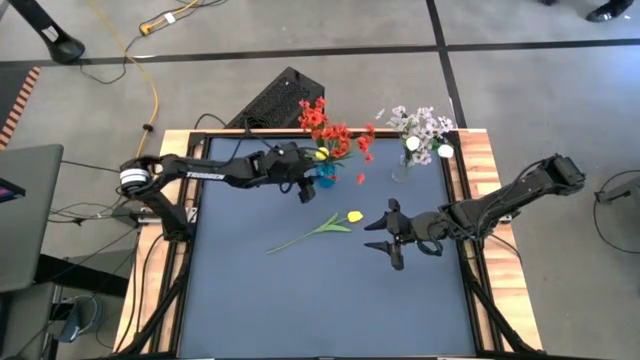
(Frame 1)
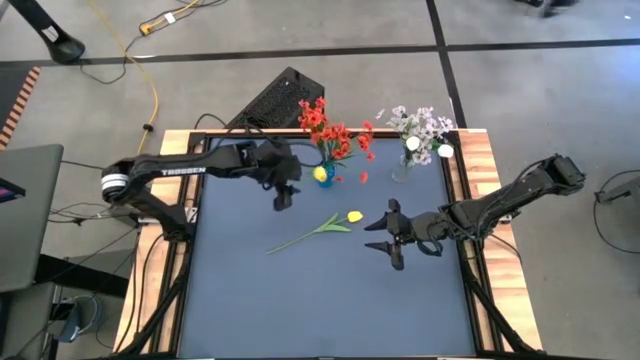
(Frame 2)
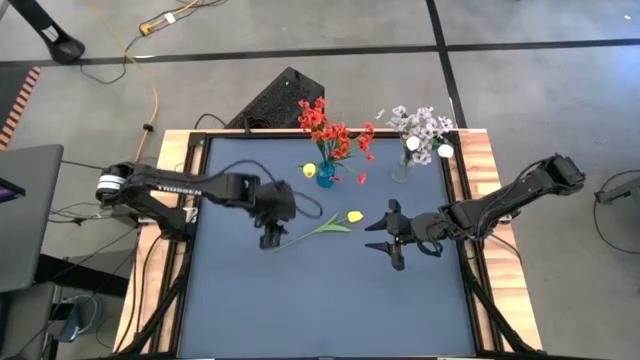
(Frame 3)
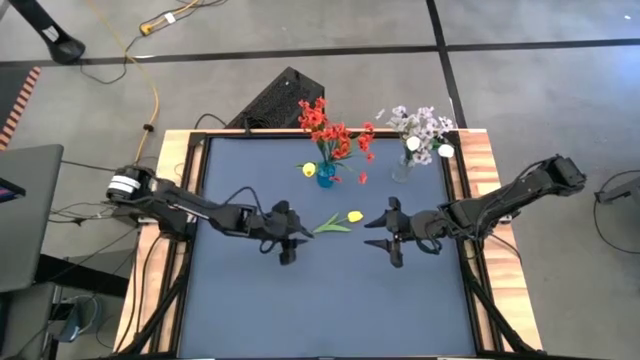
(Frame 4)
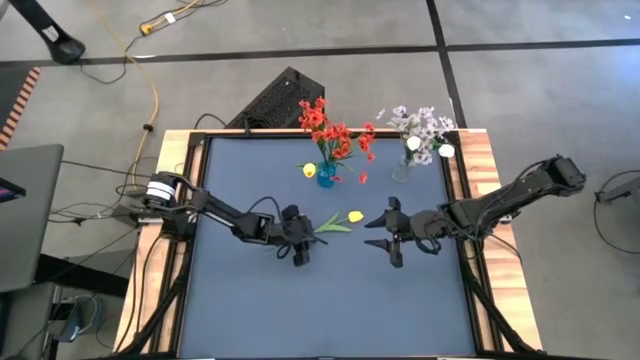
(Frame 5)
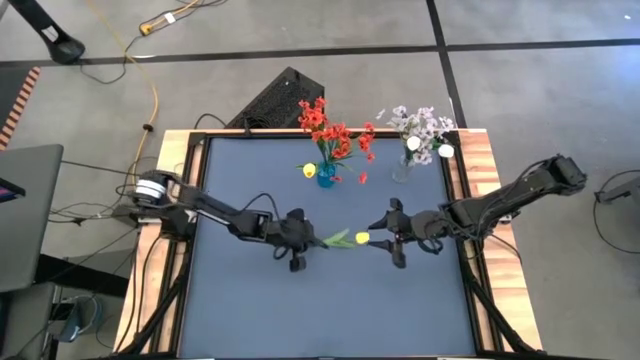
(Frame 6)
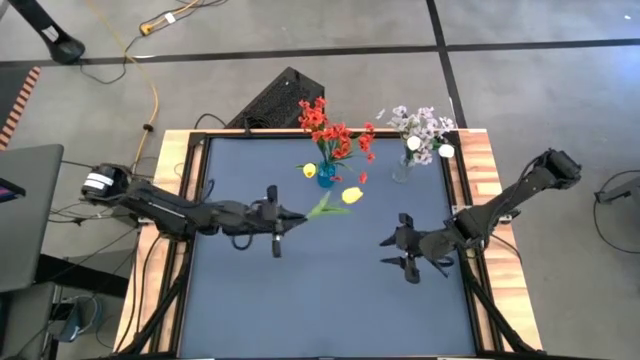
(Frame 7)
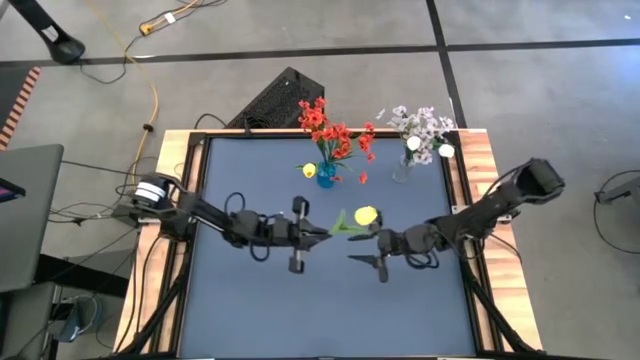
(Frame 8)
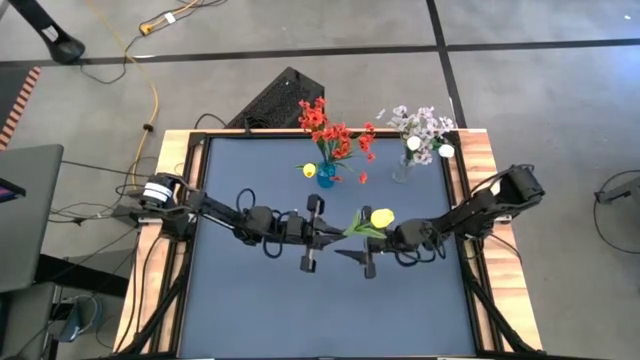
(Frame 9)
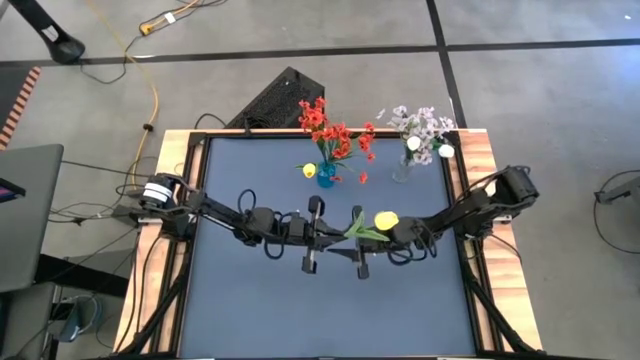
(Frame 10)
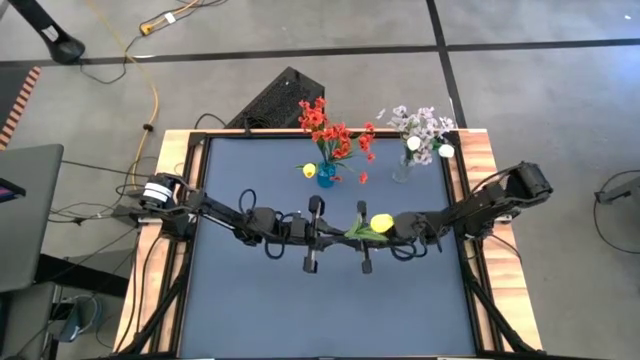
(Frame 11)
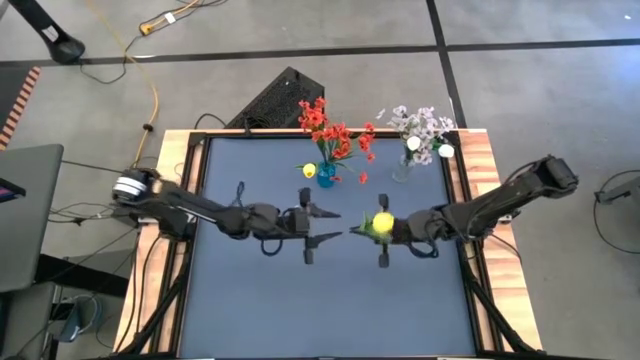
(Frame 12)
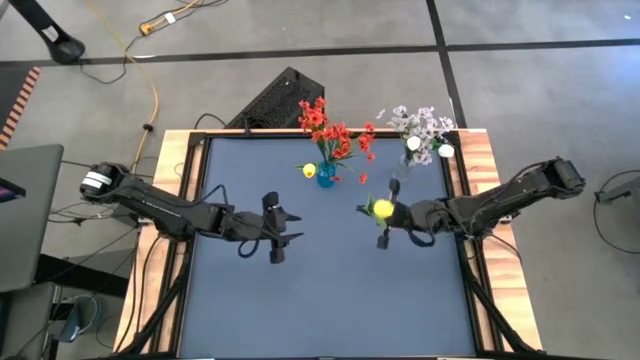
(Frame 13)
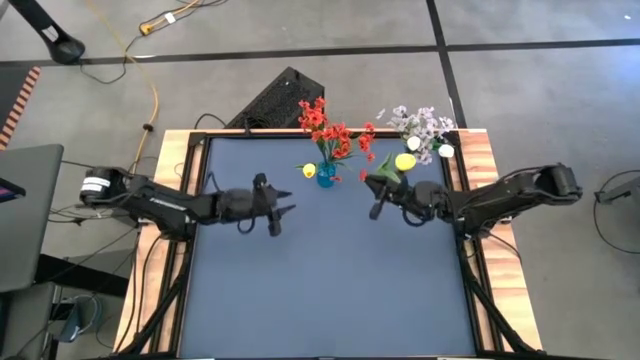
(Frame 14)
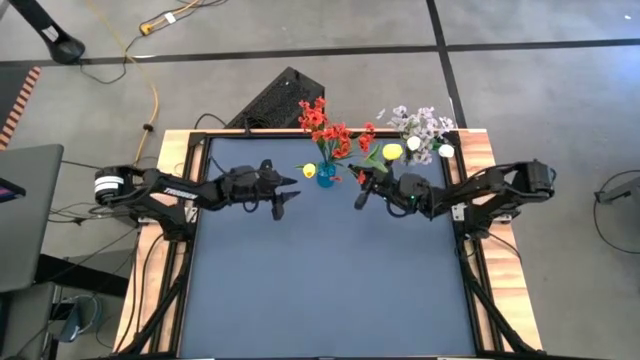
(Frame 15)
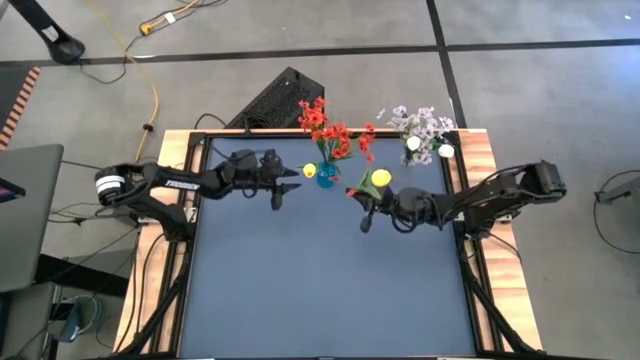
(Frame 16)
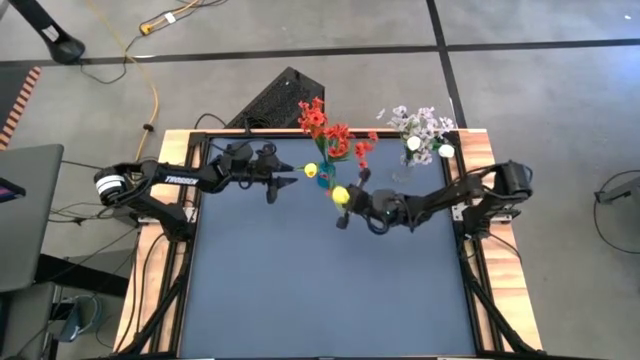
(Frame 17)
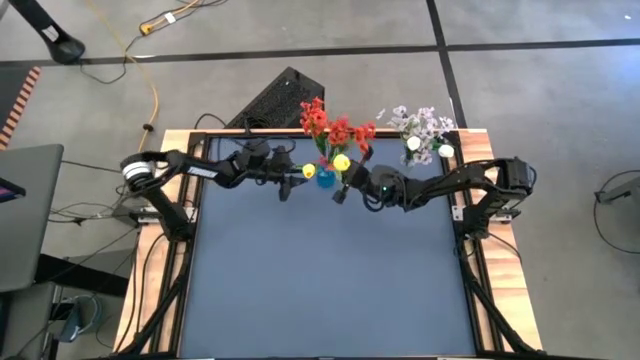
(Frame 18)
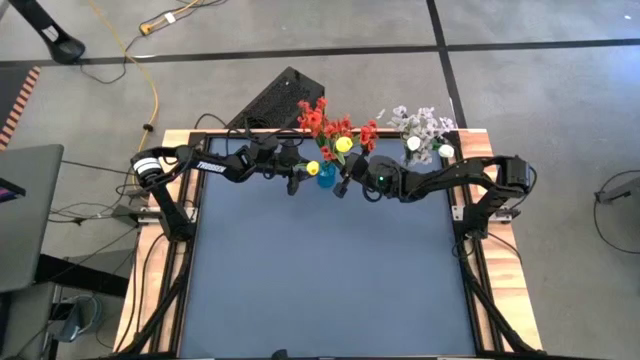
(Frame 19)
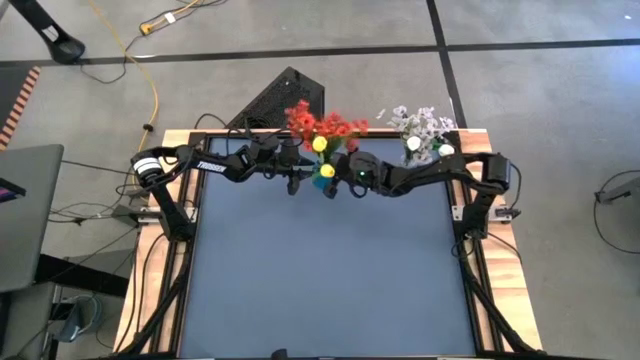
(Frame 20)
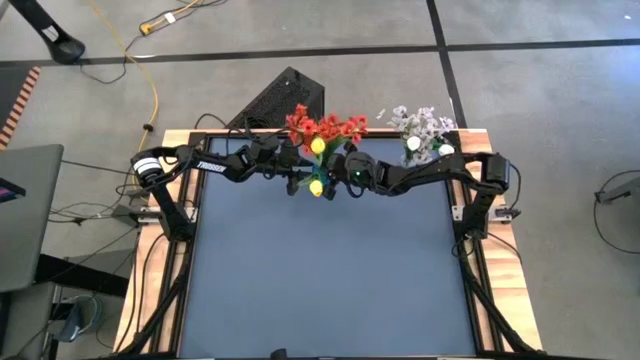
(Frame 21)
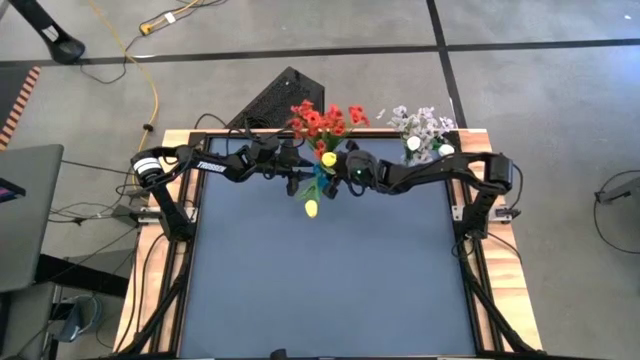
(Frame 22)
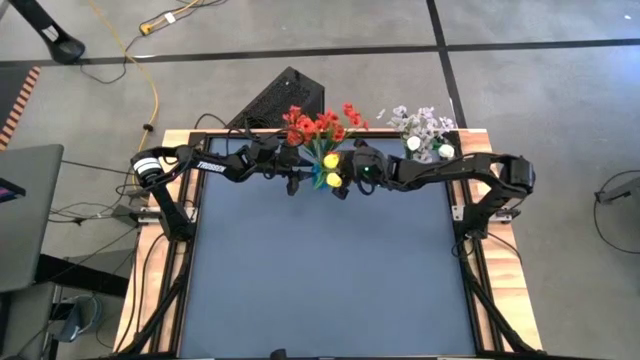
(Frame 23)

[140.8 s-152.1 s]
Task: Sort flowers into vase by color
Put the yellow flower into the blue vase

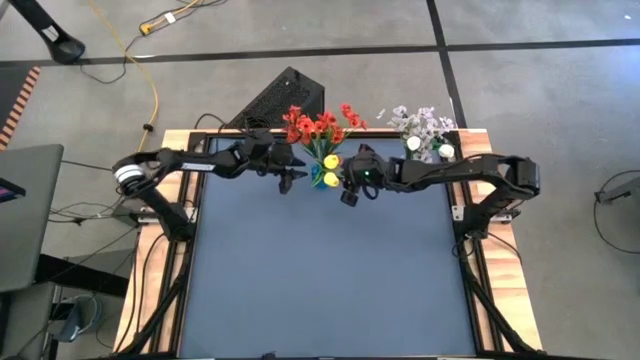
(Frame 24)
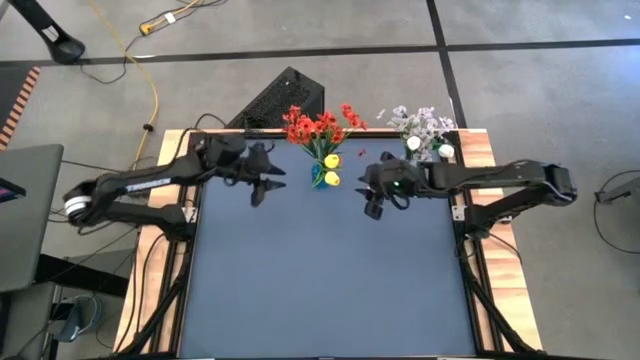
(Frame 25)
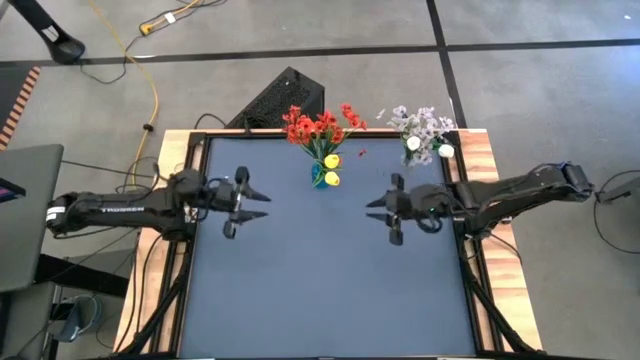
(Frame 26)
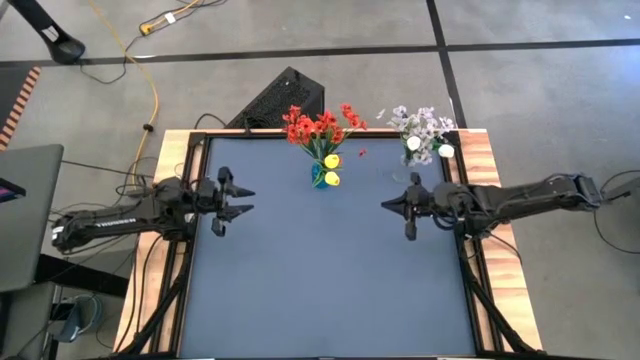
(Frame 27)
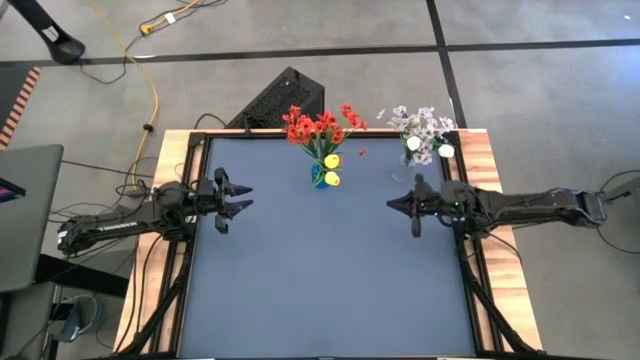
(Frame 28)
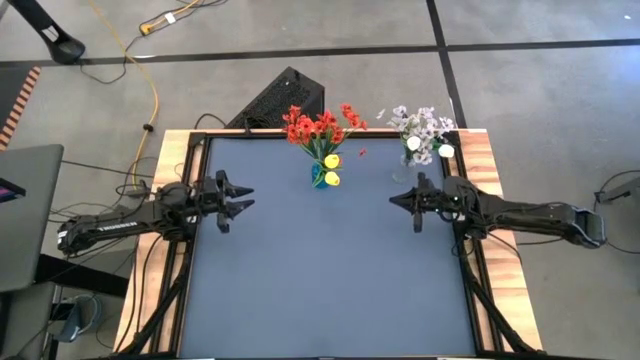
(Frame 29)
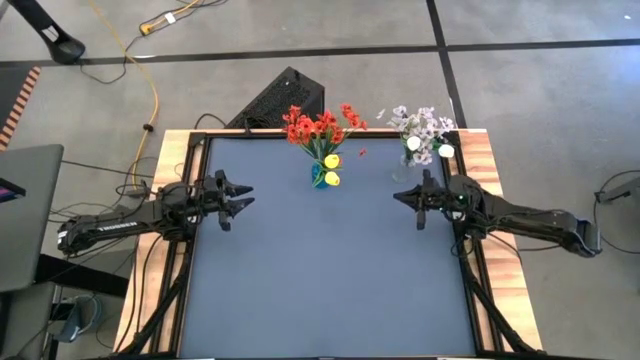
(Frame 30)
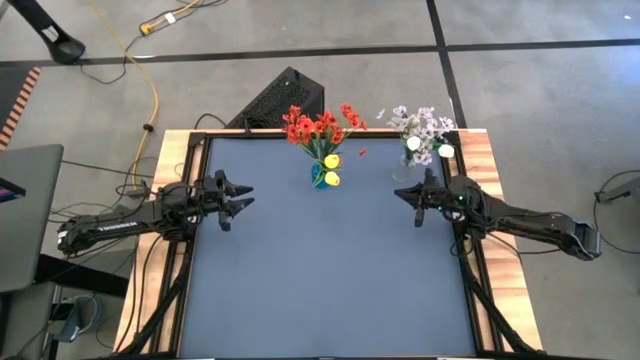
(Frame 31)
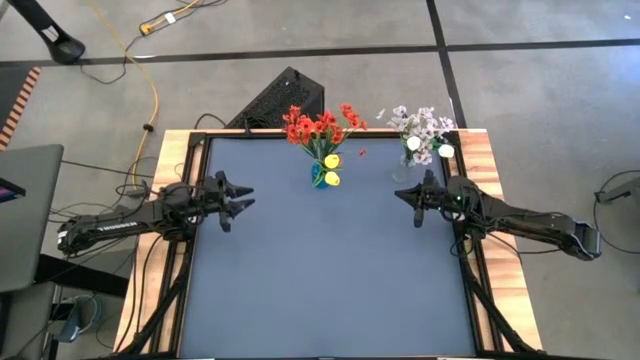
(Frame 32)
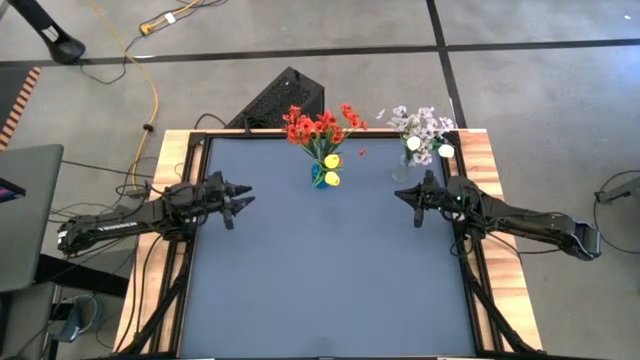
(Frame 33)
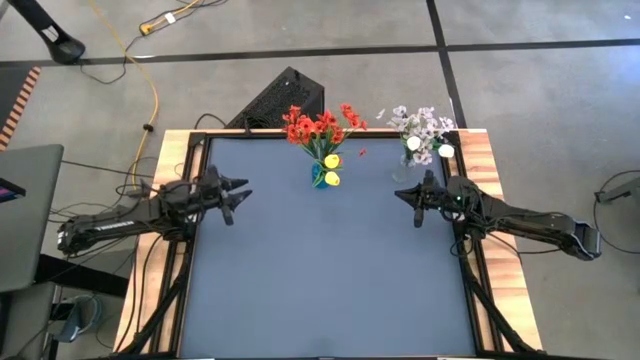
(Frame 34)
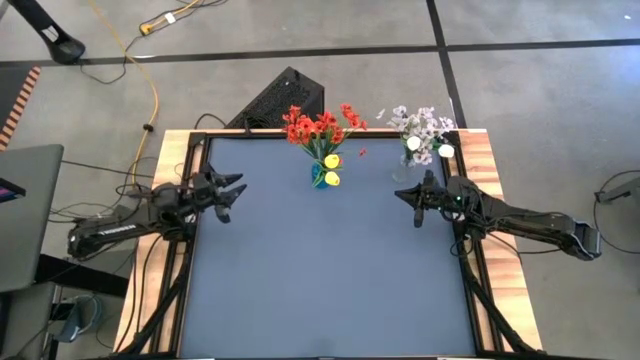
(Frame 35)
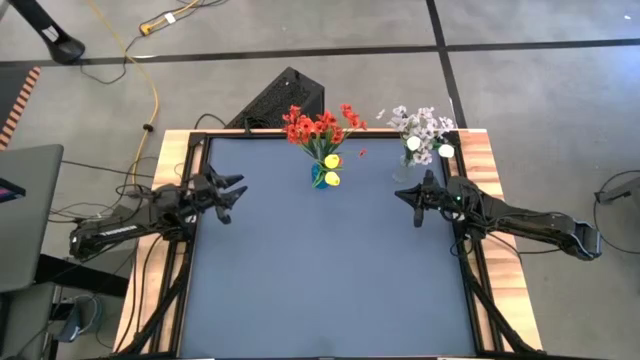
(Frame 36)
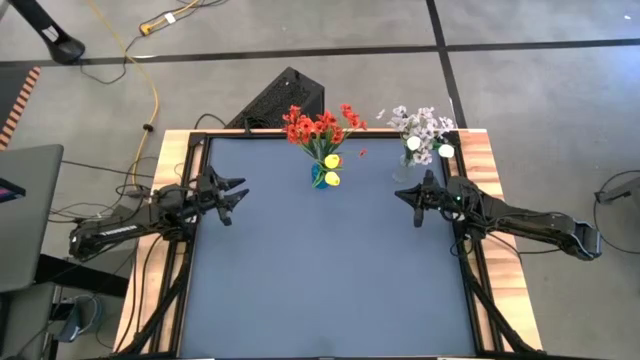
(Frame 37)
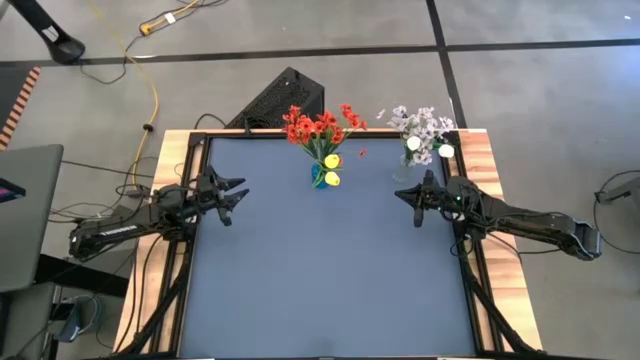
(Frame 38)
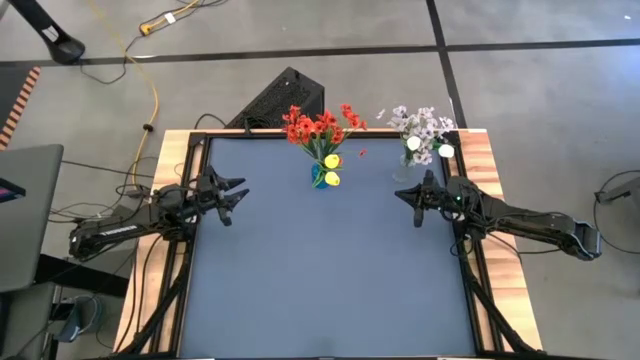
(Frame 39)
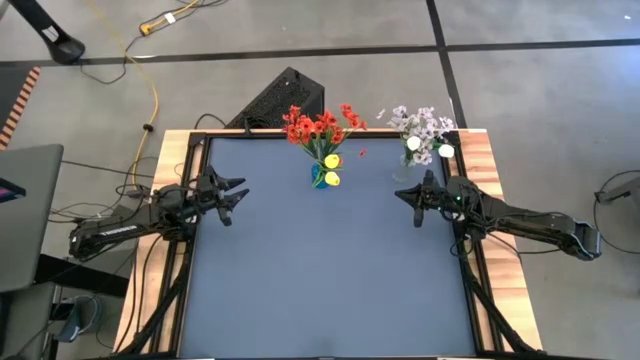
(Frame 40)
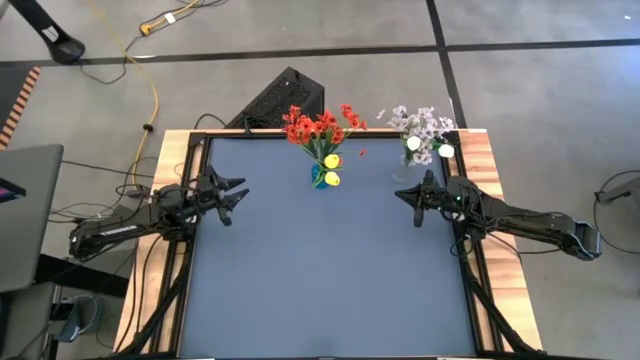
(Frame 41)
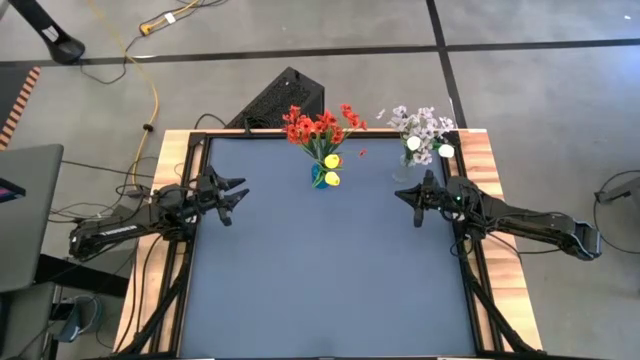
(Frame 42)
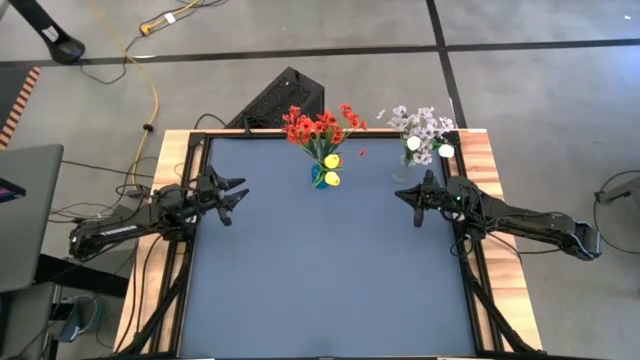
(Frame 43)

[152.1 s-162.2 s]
Return to Home Position
